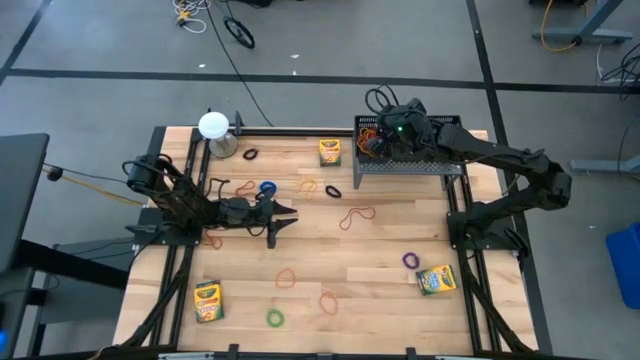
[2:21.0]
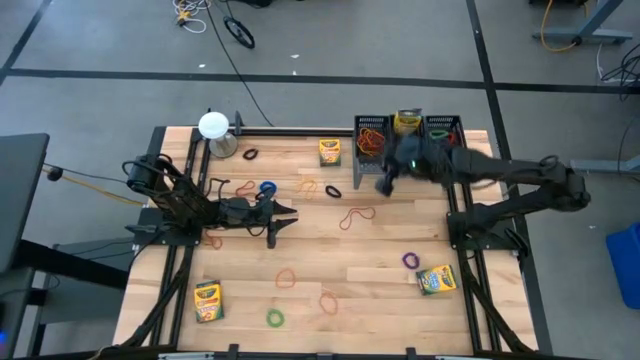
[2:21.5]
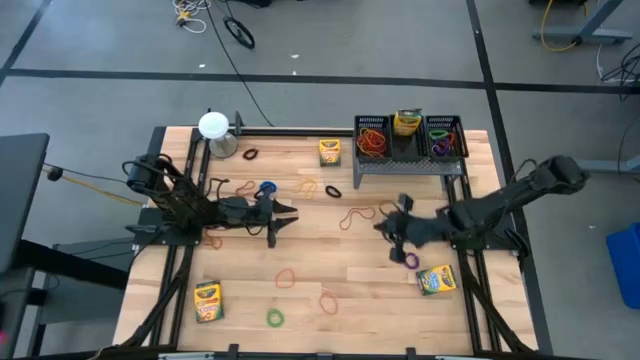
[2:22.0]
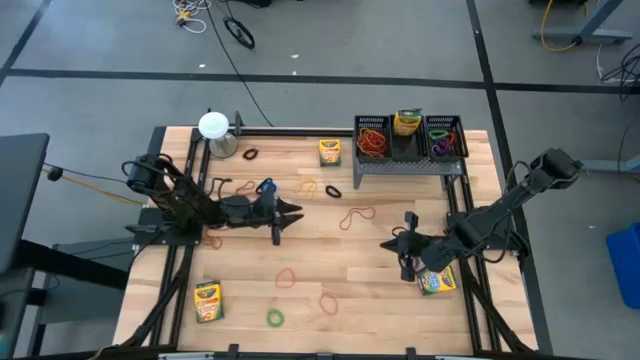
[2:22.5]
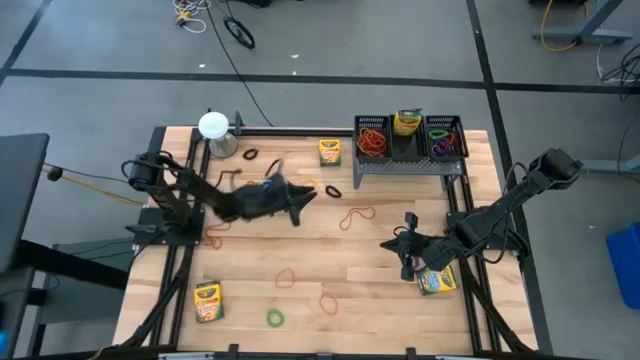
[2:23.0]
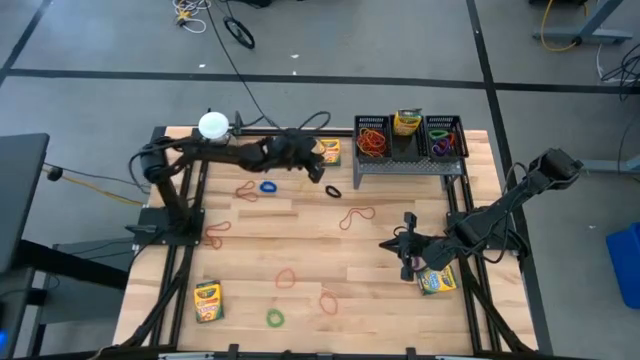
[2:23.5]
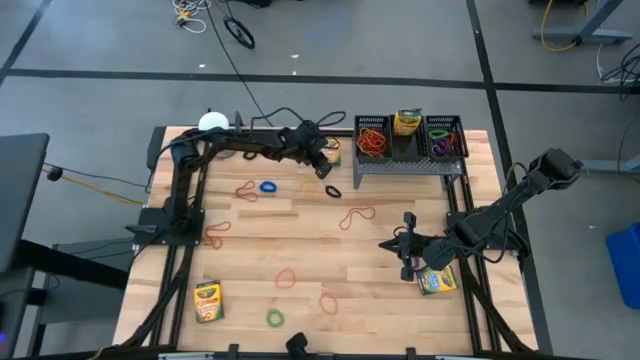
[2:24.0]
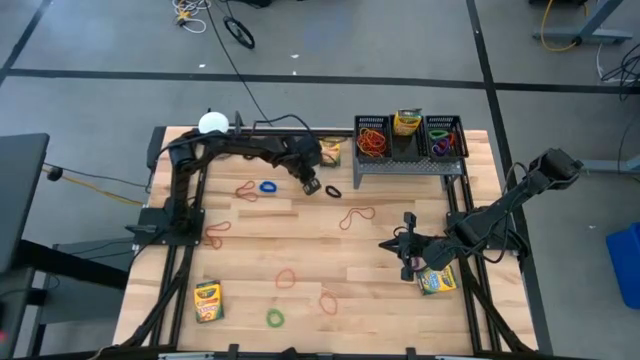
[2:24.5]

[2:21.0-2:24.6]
Task: Pick & Place Office Desk Supplies
Put the yellow crayon box into the middle black bin on the shelf

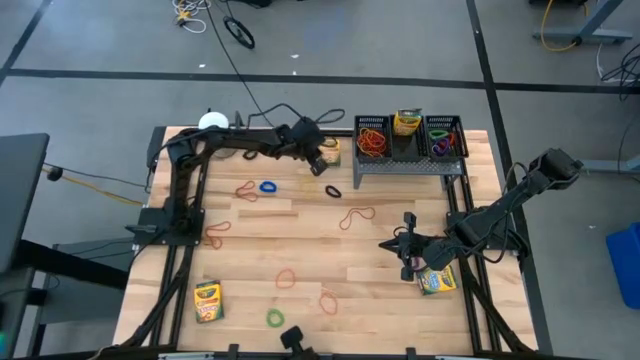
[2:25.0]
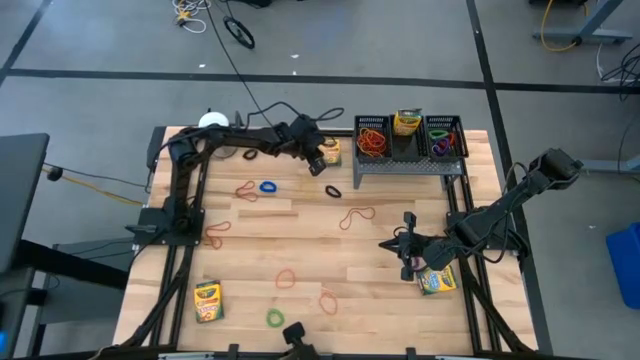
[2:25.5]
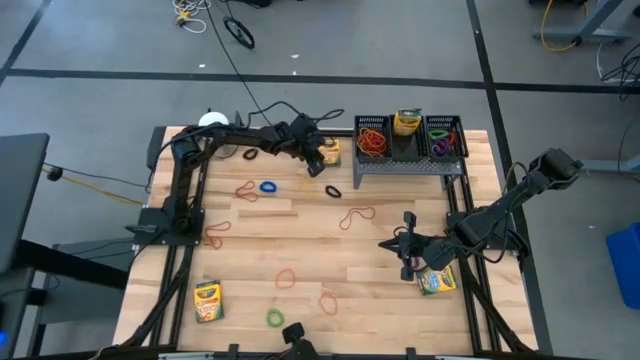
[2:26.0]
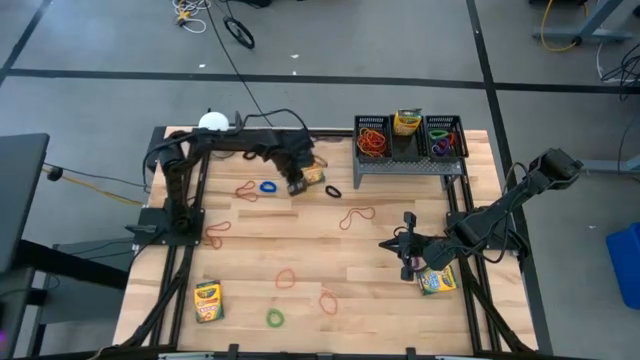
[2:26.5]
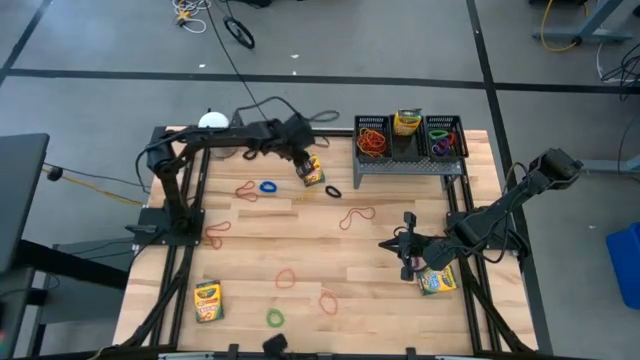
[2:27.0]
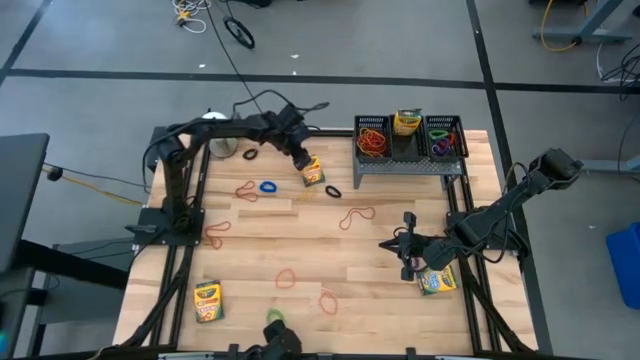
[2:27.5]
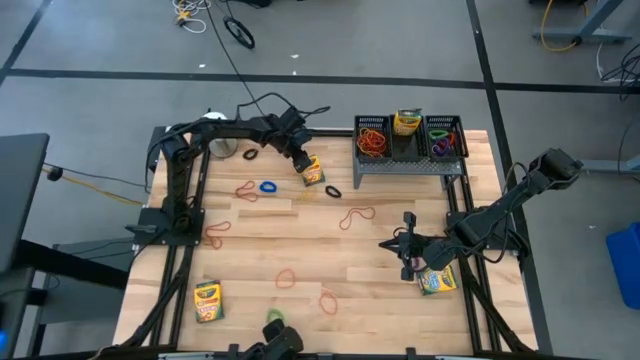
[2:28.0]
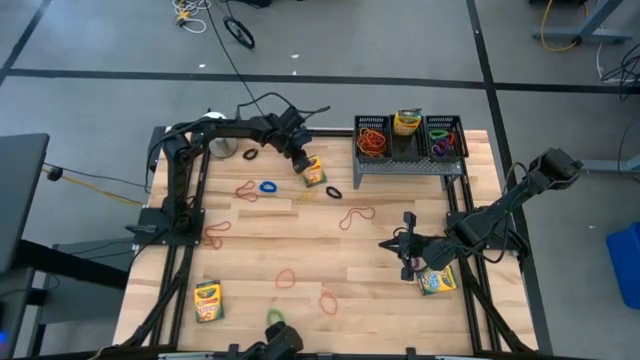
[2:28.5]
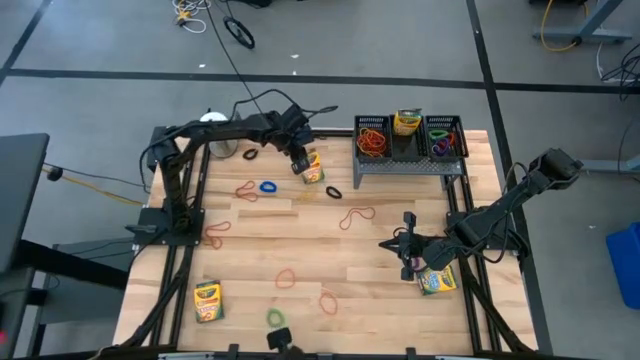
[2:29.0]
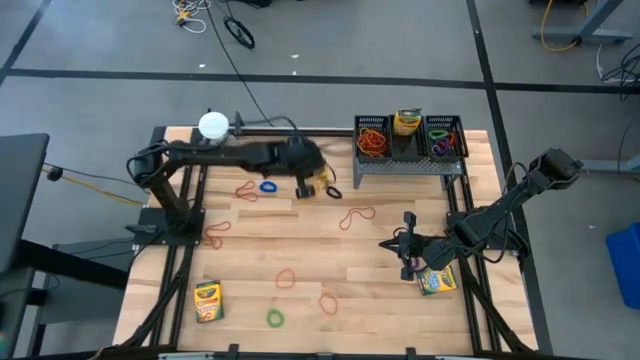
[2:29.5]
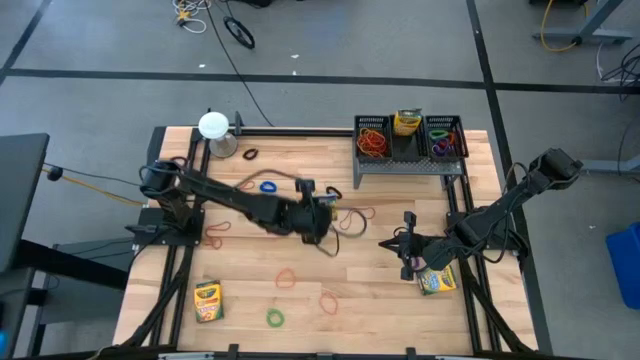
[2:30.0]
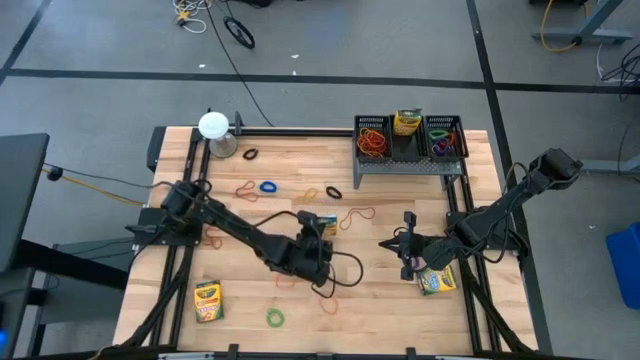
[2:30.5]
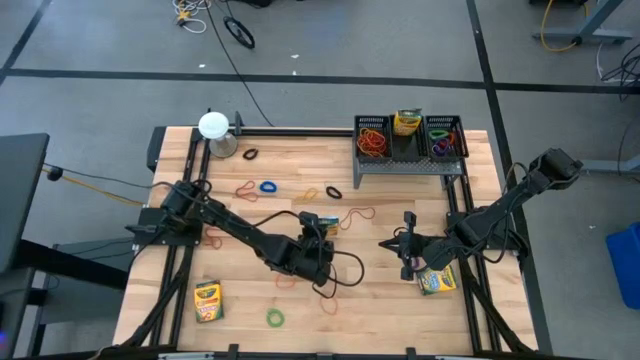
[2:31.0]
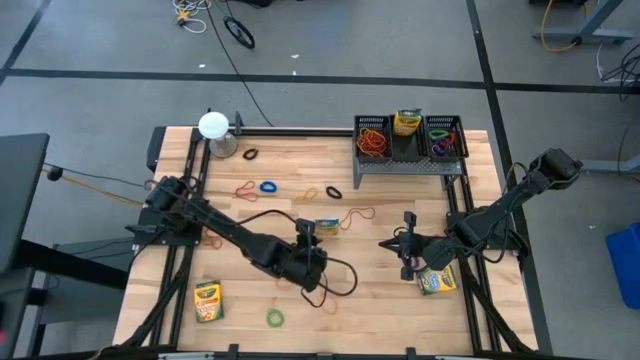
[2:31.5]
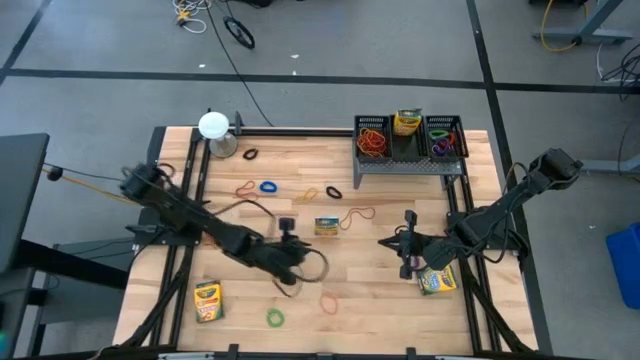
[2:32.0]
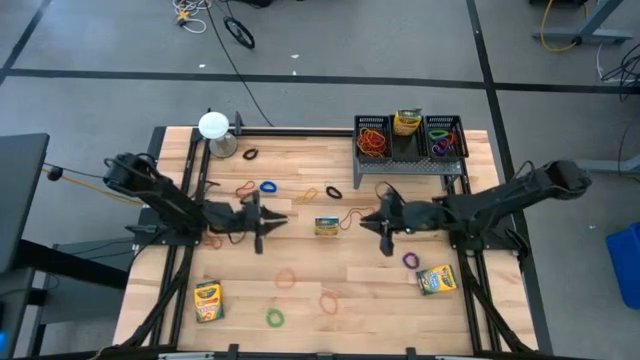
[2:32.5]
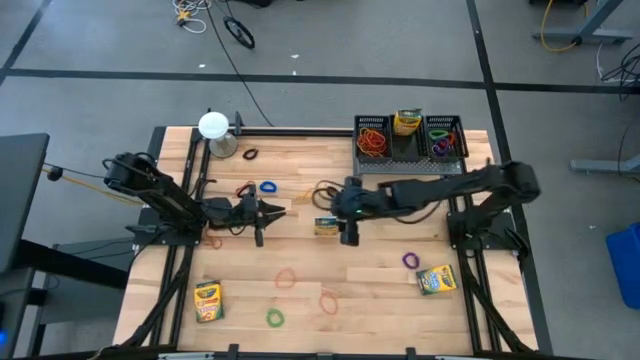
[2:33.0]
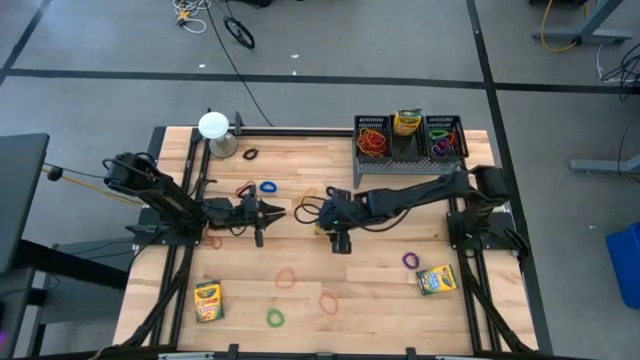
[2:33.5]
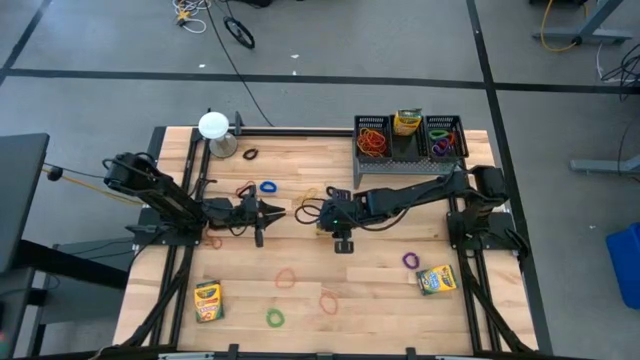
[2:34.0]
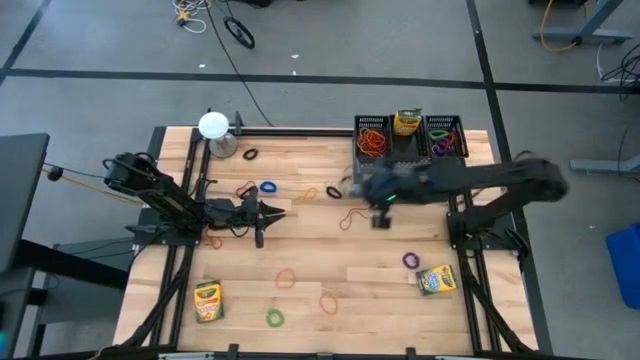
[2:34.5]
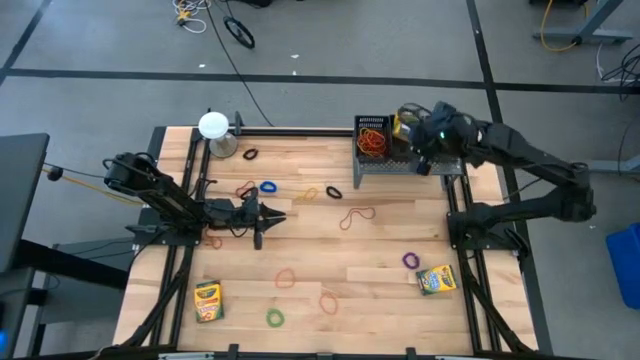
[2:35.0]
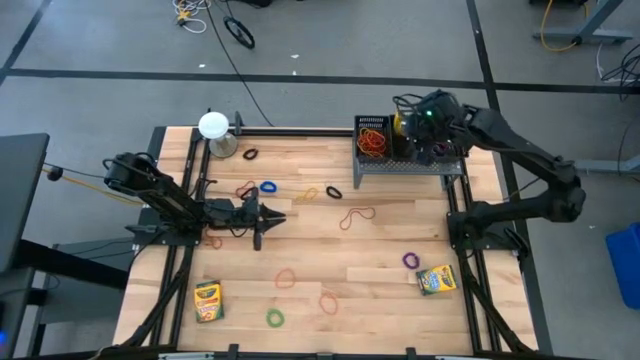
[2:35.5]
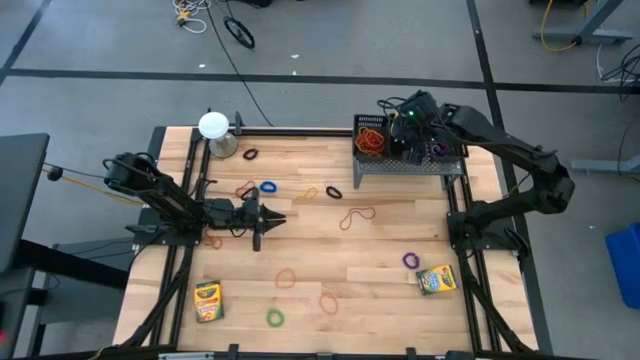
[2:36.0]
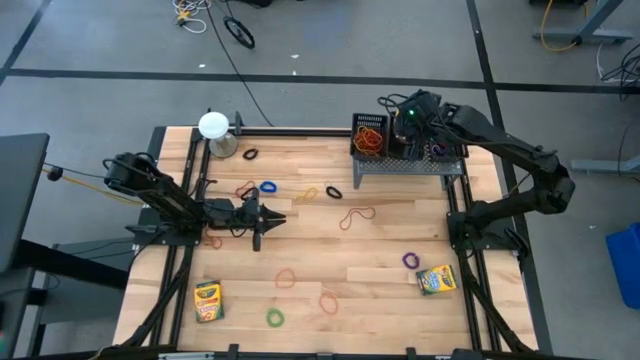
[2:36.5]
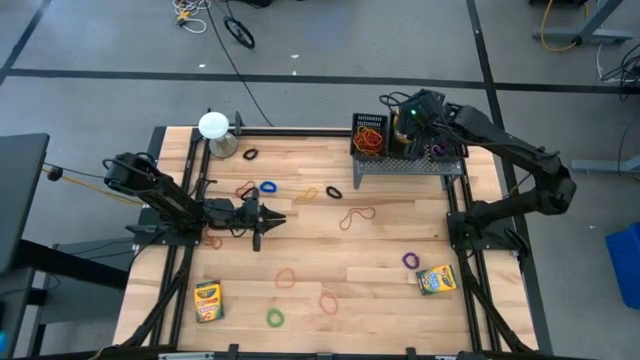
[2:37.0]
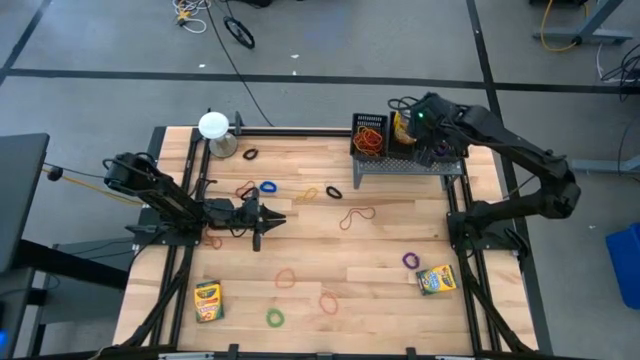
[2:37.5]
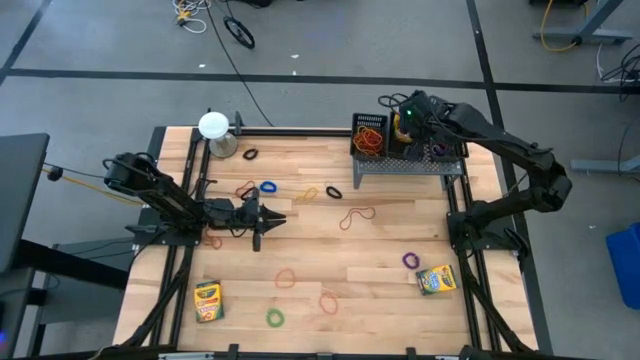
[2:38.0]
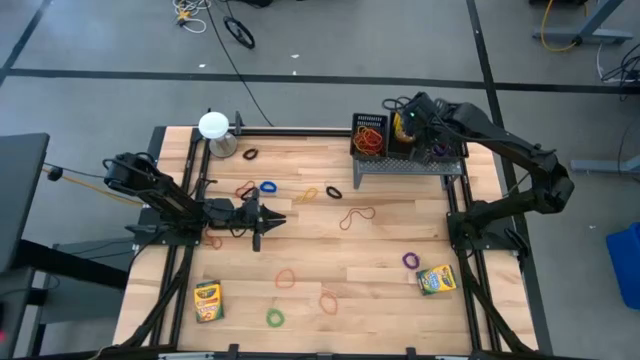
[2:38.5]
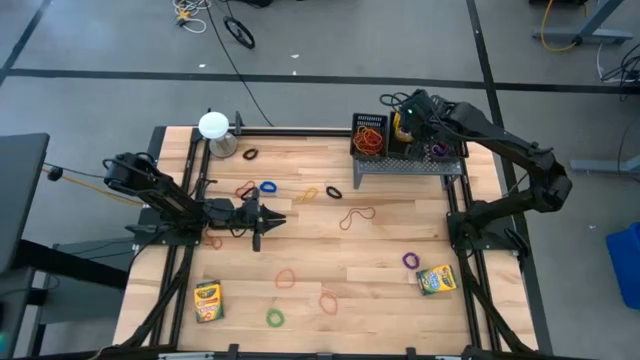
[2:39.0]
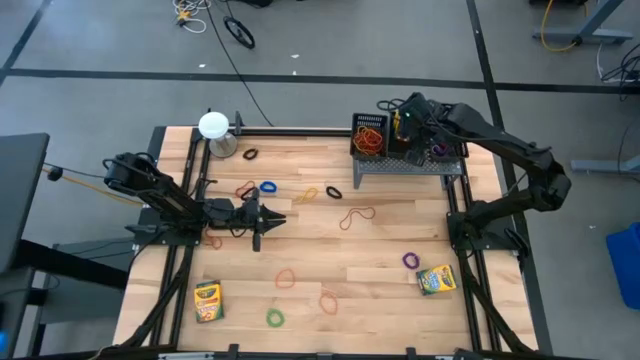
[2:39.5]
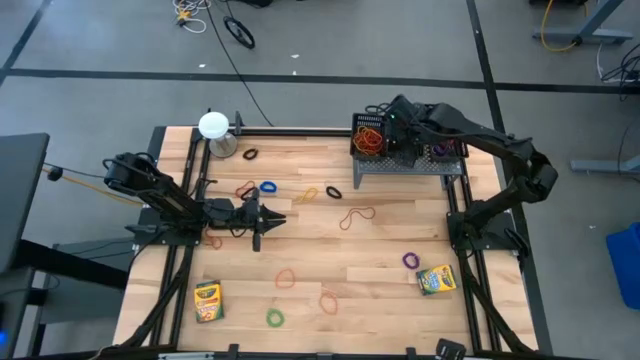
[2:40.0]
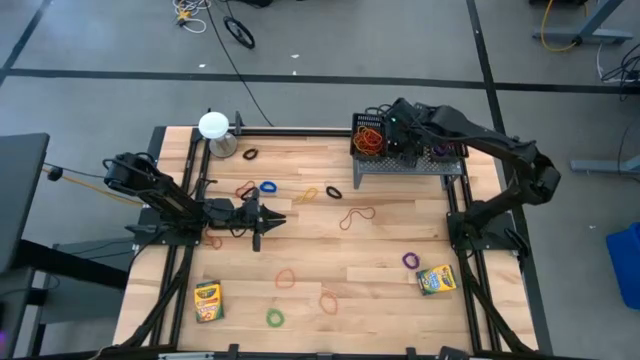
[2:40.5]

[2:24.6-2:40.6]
Put the yellow crayon box into the middle black bin on the shelf

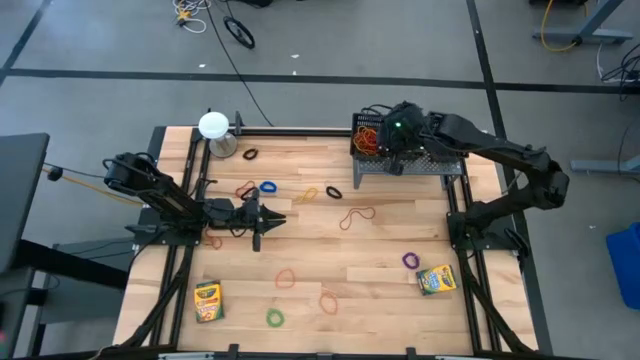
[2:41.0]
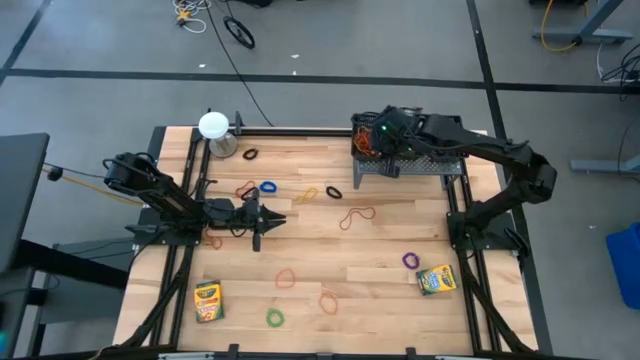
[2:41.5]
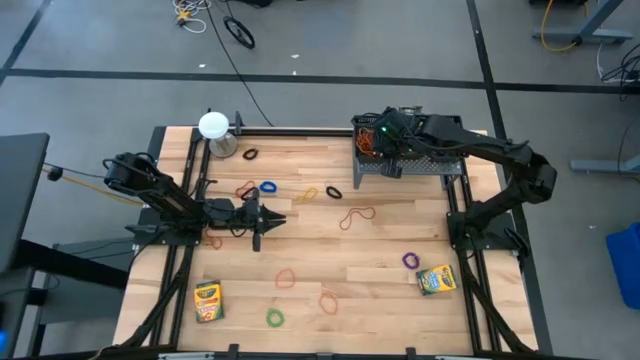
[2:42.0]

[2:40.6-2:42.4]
Adjust the left black bin on the shelf
